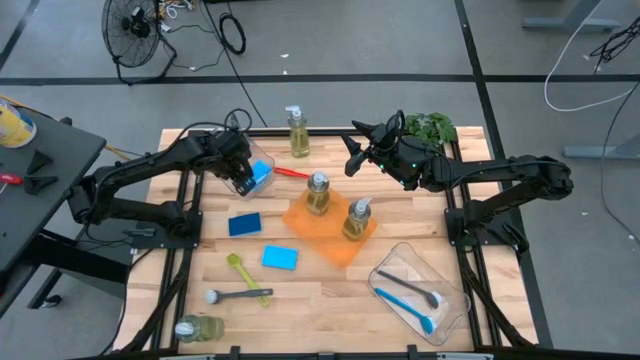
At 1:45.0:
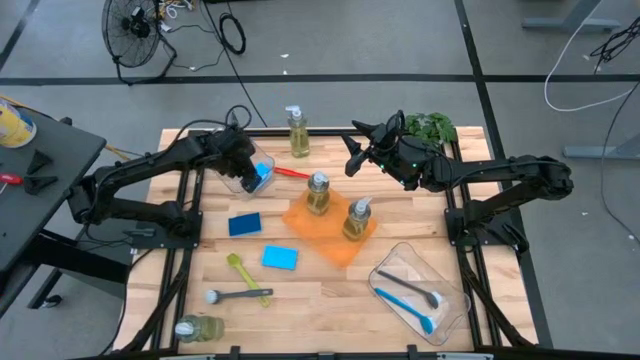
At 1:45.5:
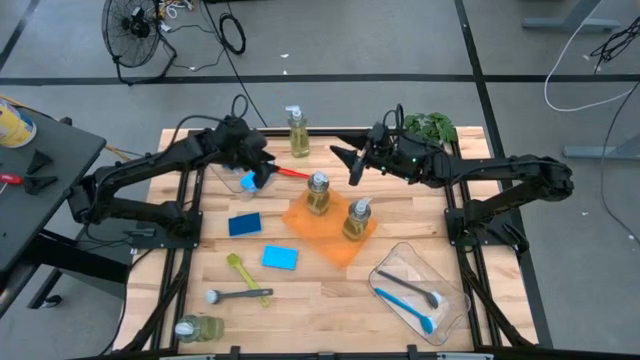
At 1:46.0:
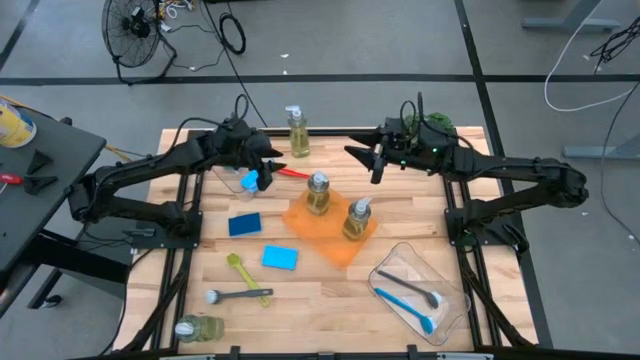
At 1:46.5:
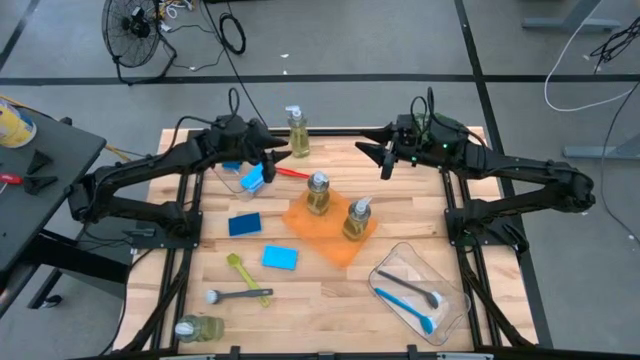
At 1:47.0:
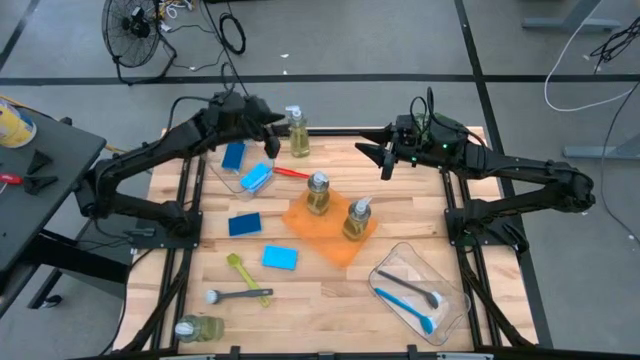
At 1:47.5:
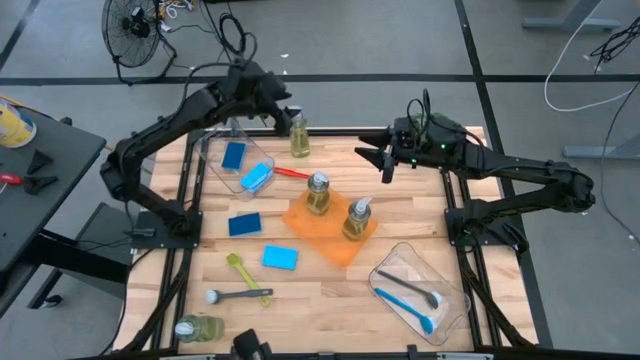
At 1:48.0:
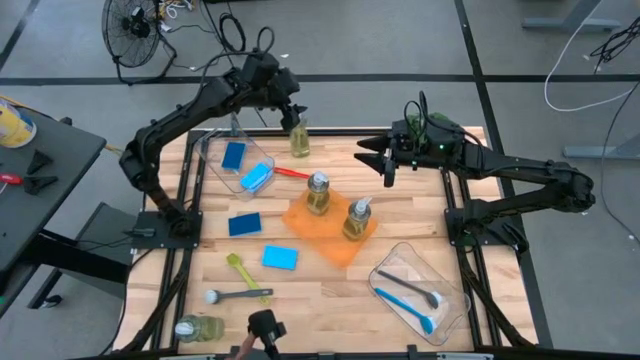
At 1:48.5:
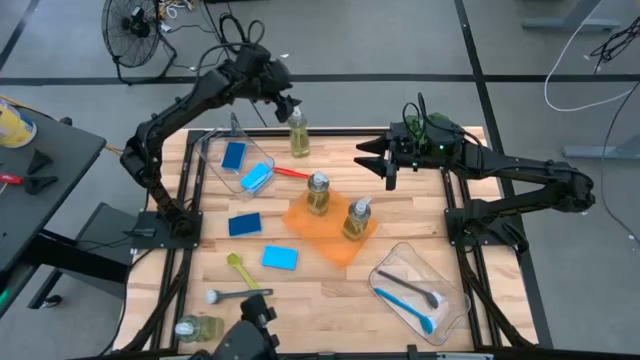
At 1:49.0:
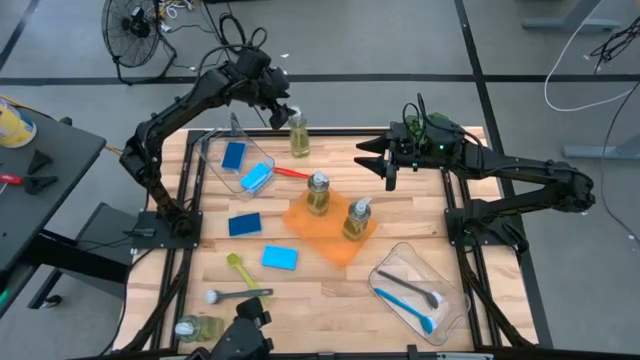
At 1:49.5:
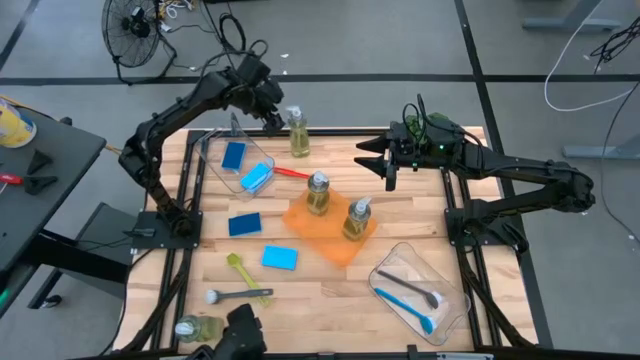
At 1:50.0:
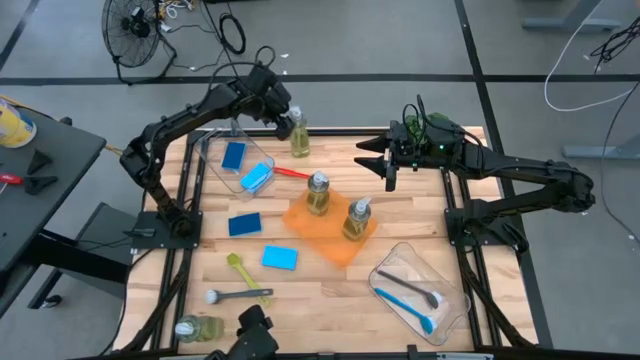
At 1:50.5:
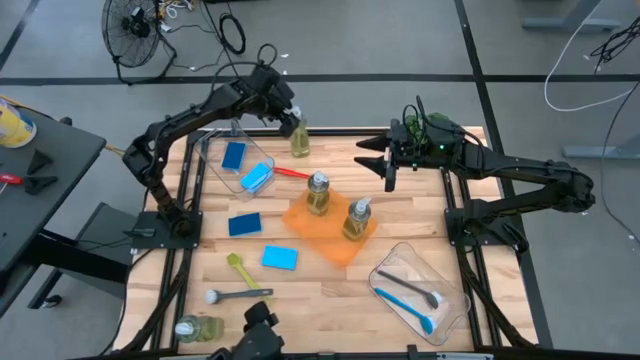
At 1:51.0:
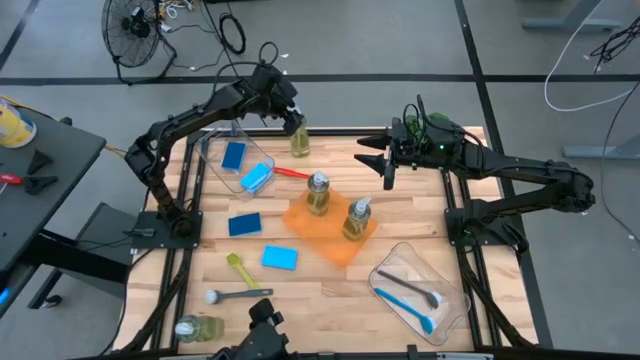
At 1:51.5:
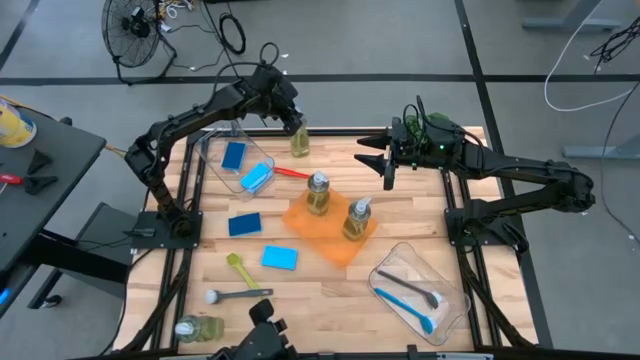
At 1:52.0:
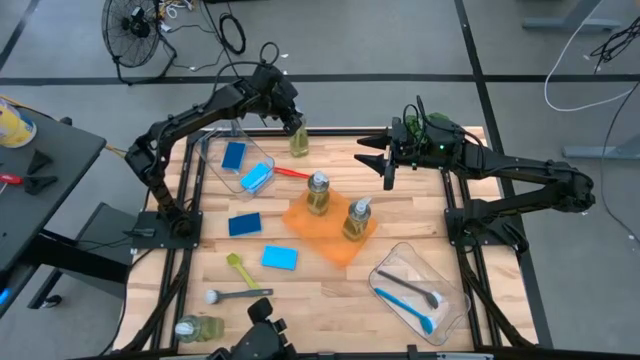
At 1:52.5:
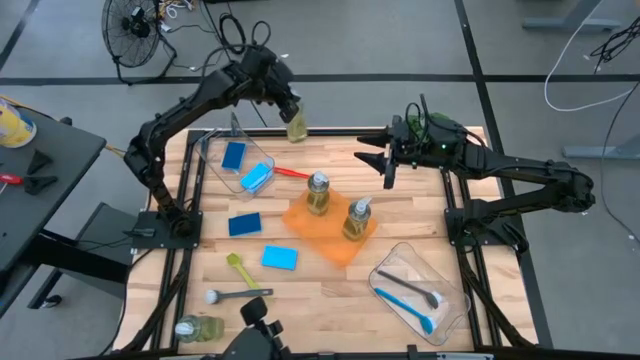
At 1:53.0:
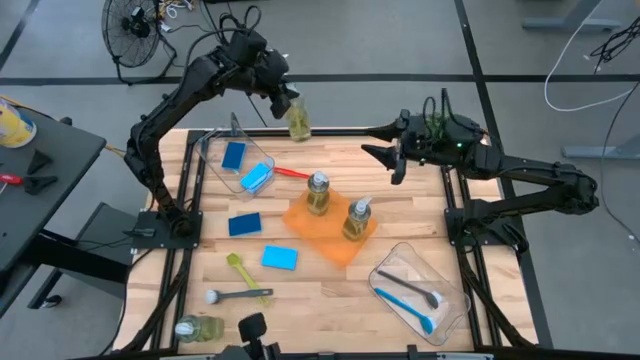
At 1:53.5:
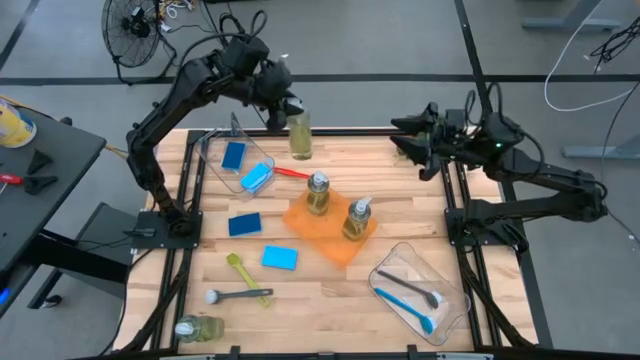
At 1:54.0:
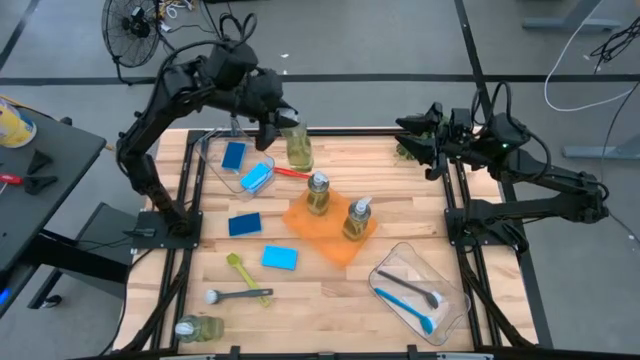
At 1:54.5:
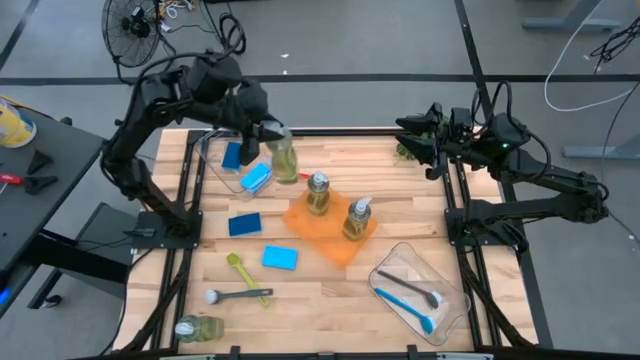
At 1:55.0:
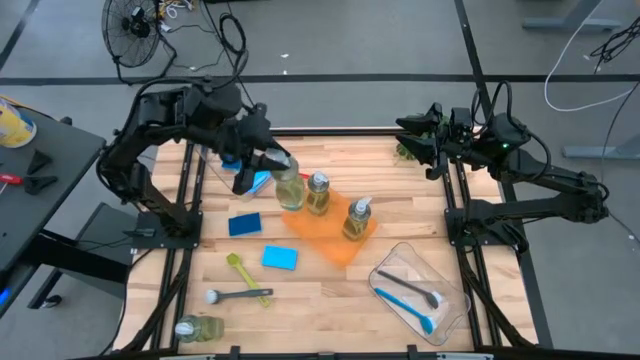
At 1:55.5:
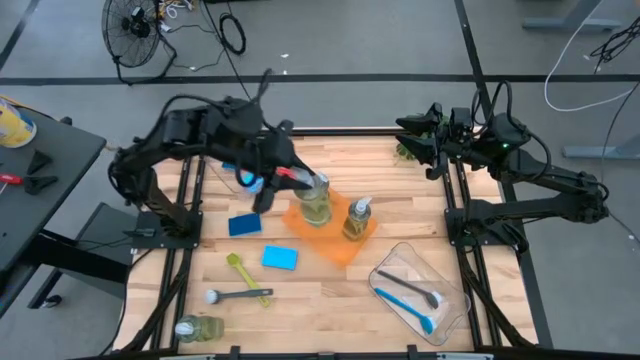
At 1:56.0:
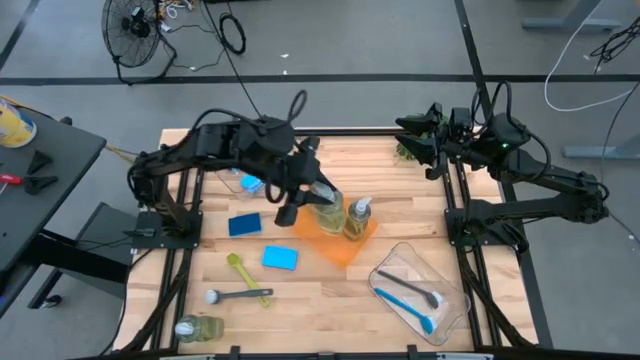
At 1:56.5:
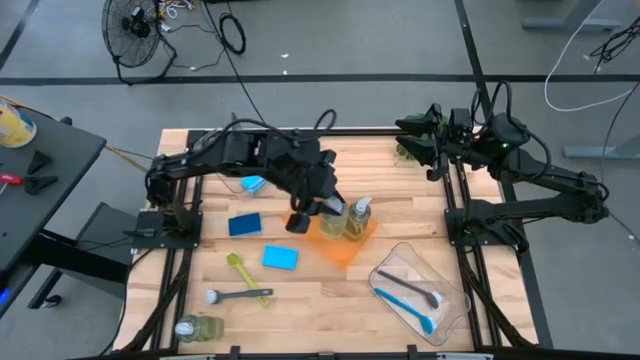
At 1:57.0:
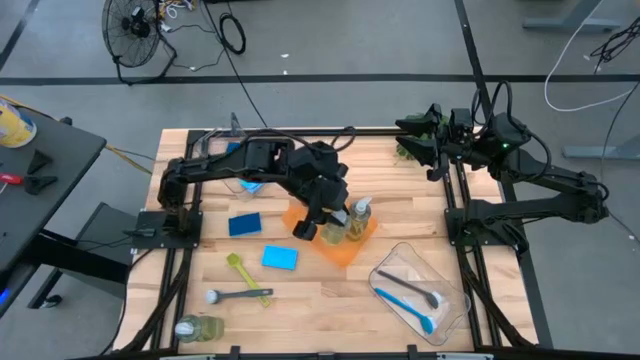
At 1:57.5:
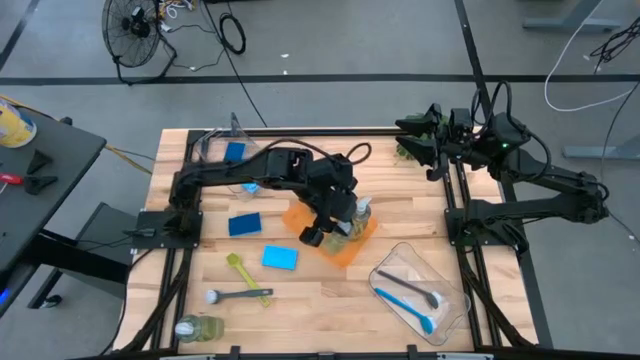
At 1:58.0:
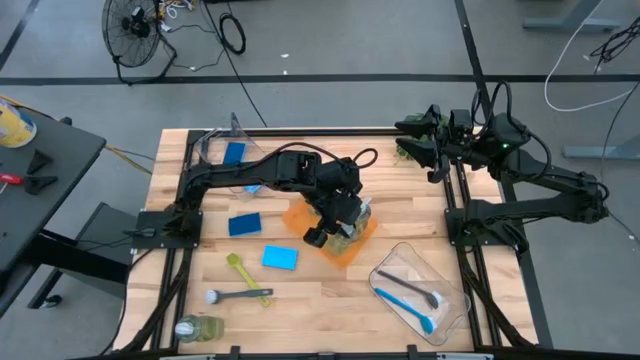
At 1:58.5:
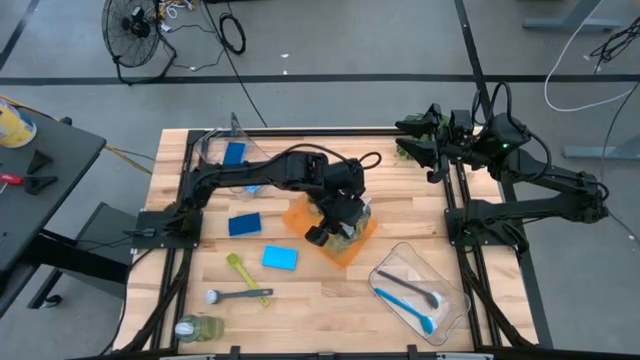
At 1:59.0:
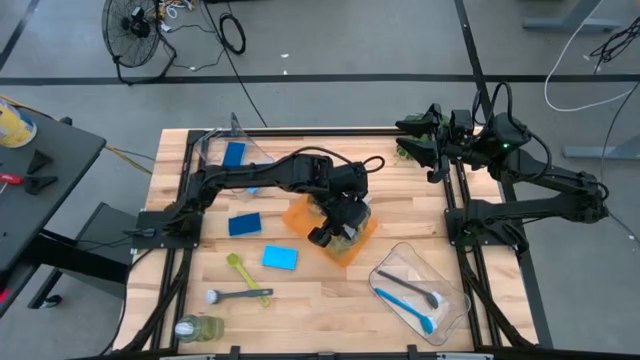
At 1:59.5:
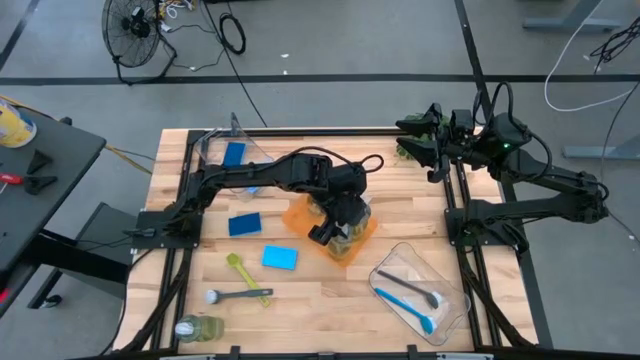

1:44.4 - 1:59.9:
Task: Pick & Place Kitchen Sink Supplies
Put the yellow dish soap into the orange bin

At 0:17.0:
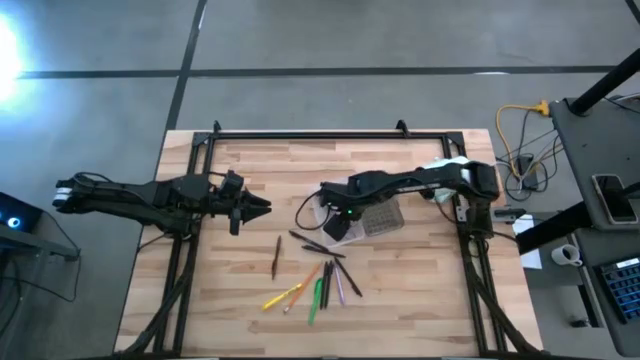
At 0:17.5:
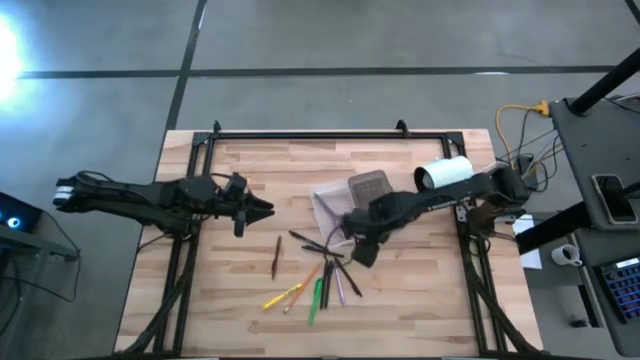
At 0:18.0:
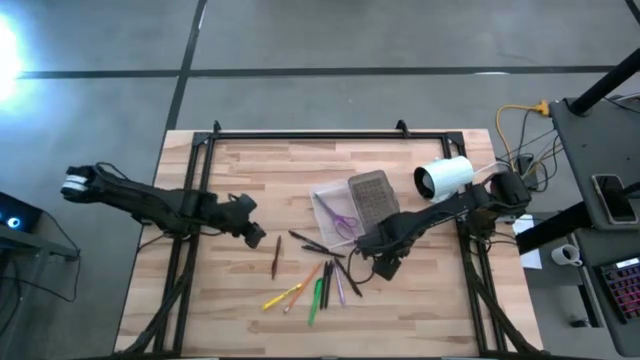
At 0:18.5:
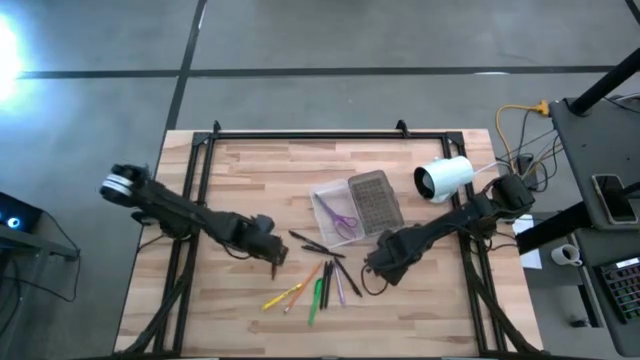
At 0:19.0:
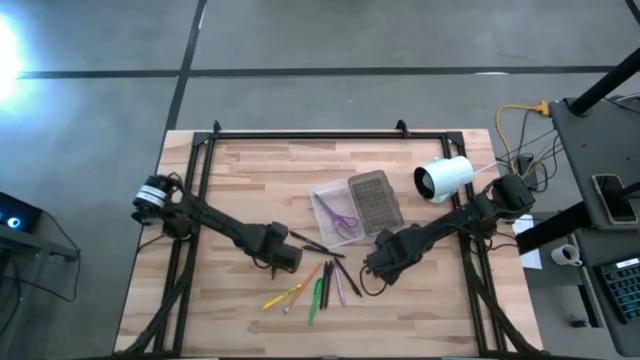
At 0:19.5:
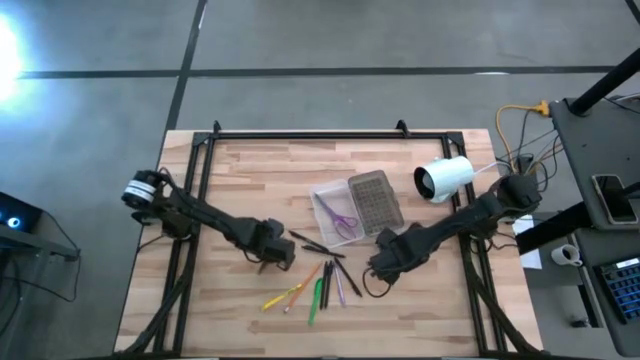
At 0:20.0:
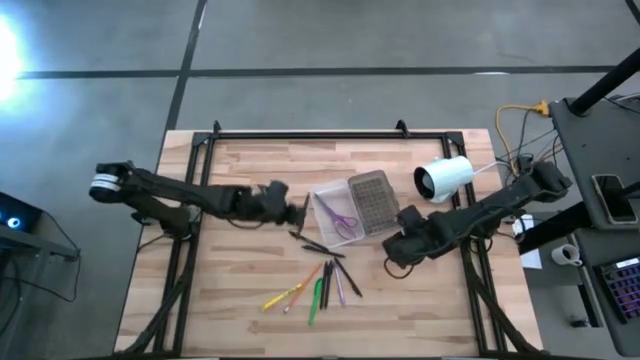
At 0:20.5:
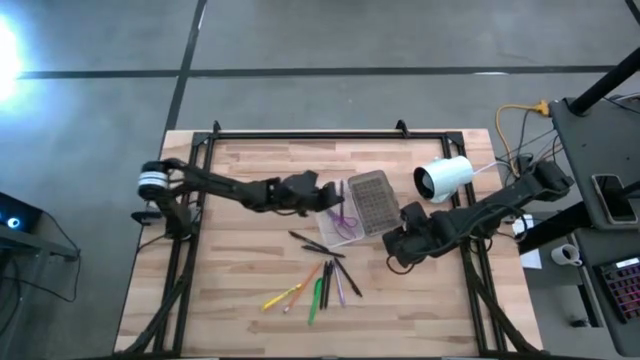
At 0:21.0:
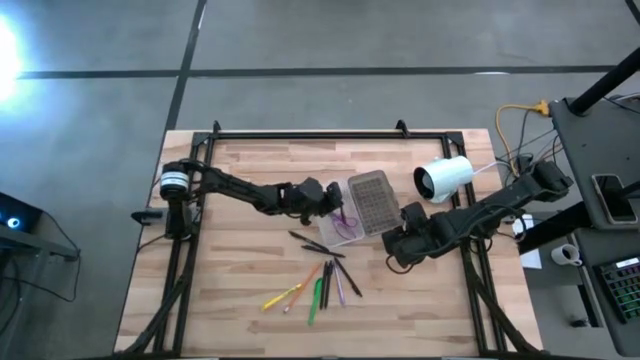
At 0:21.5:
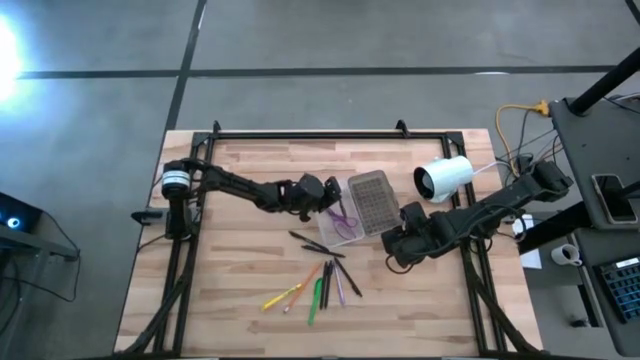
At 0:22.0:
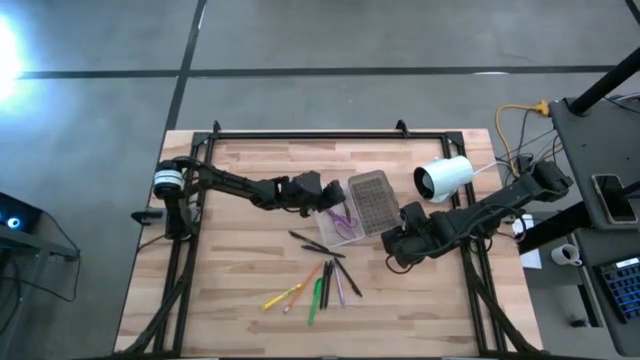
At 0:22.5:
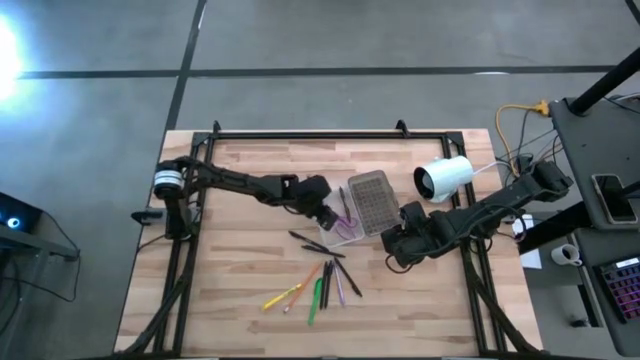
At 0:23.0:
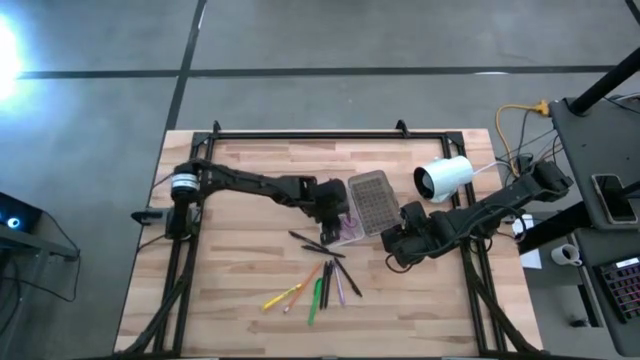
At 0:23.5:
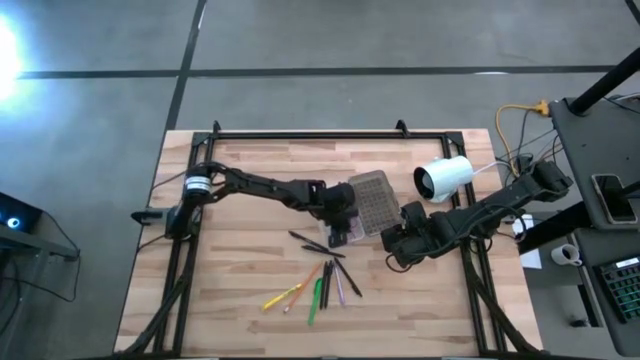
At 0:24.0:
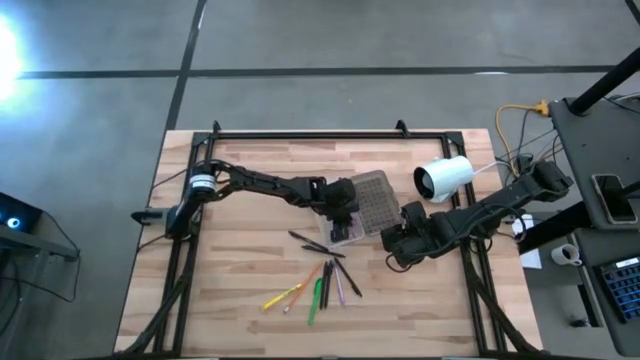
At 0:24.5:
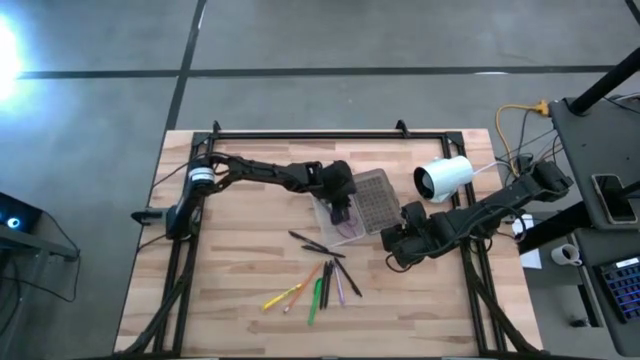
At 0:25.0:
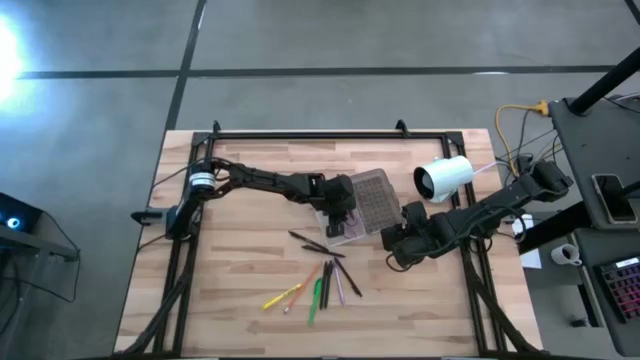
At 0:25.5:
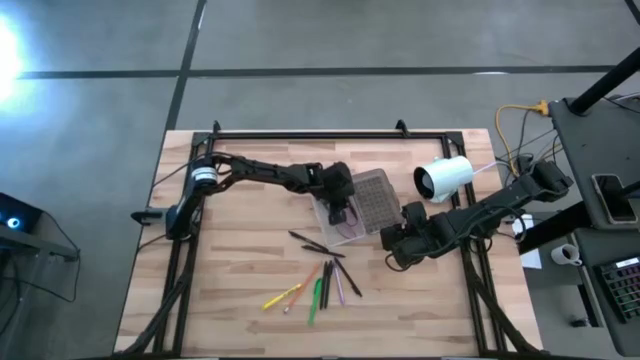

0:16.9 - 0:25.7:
Task: Pick & place school supplies into a supply box
Put the brown pen into the supply box
